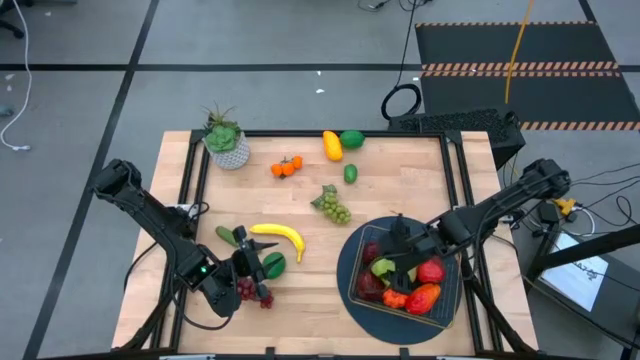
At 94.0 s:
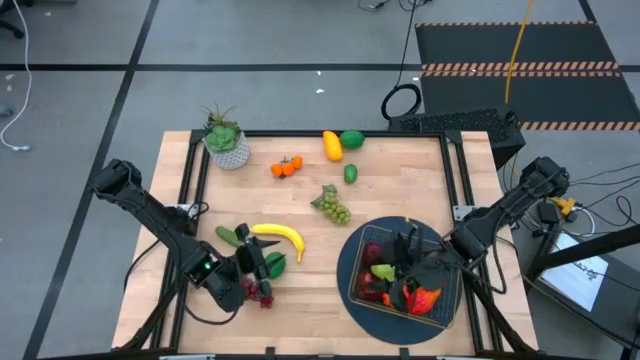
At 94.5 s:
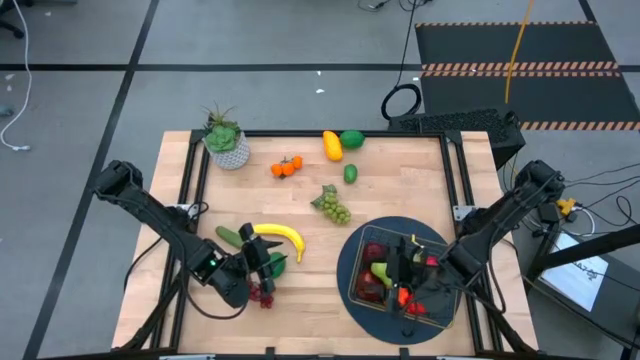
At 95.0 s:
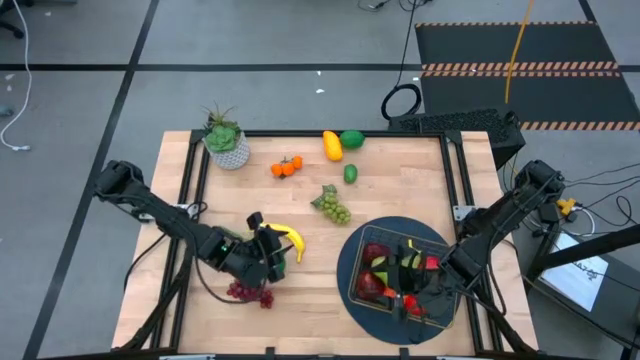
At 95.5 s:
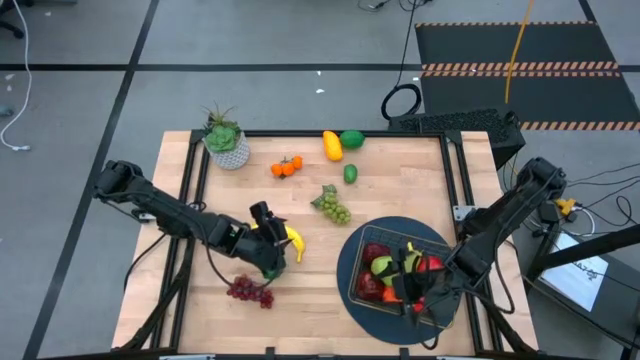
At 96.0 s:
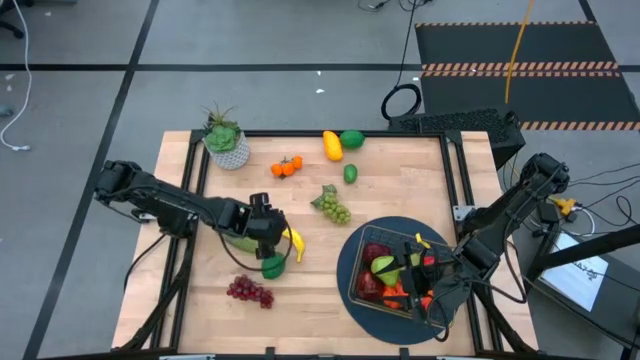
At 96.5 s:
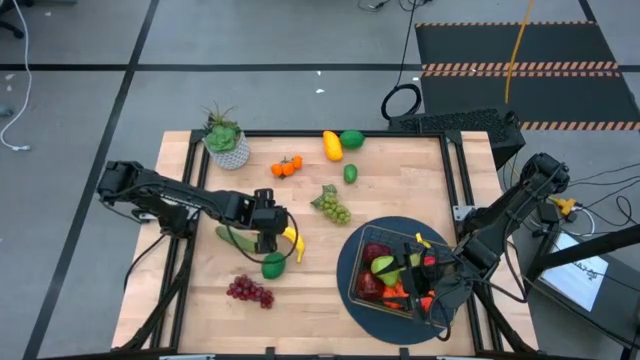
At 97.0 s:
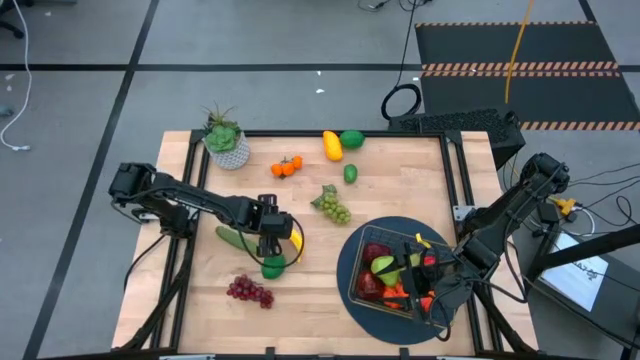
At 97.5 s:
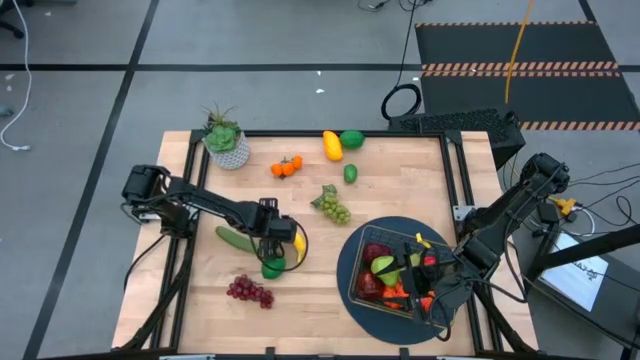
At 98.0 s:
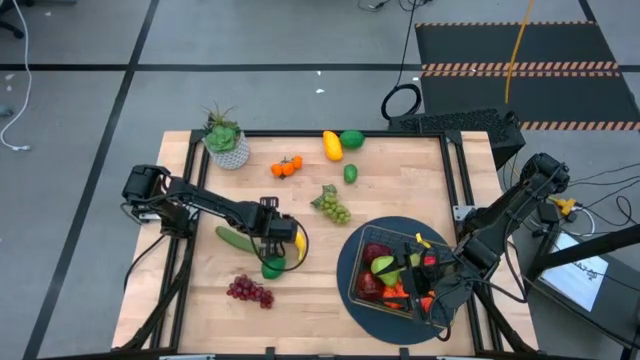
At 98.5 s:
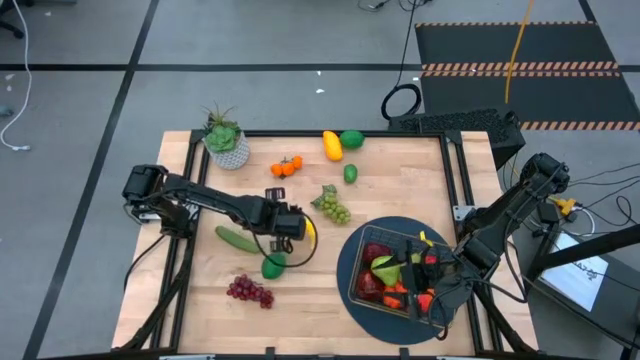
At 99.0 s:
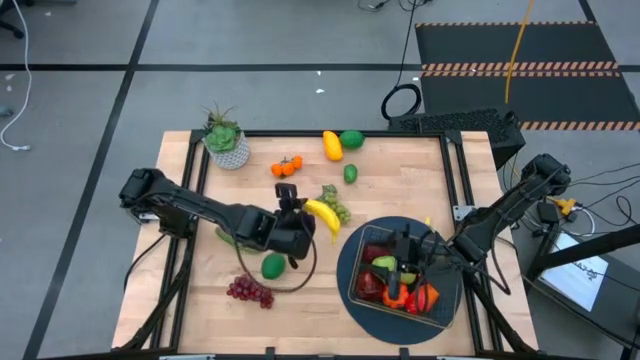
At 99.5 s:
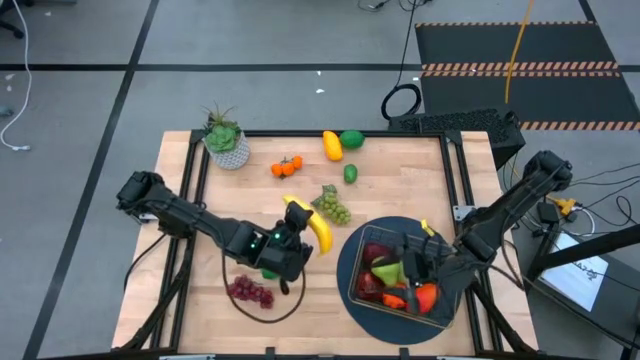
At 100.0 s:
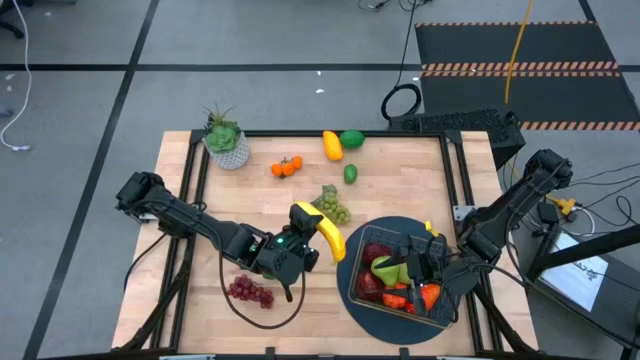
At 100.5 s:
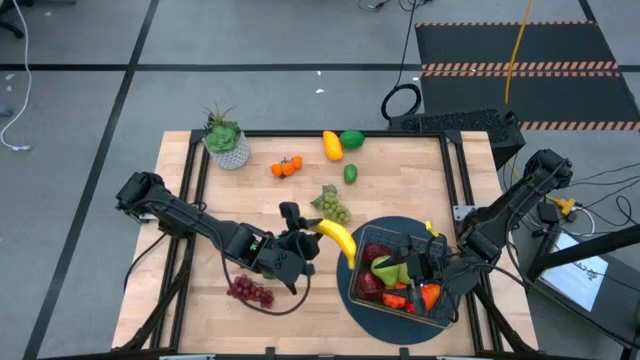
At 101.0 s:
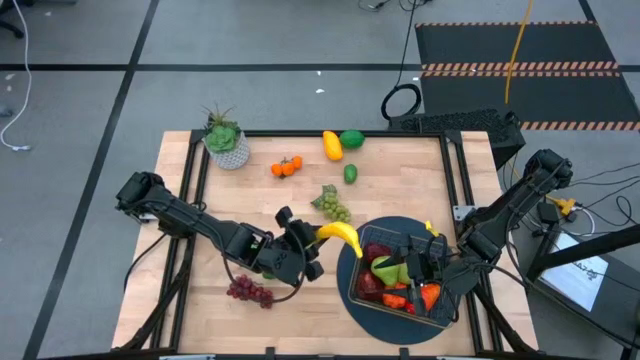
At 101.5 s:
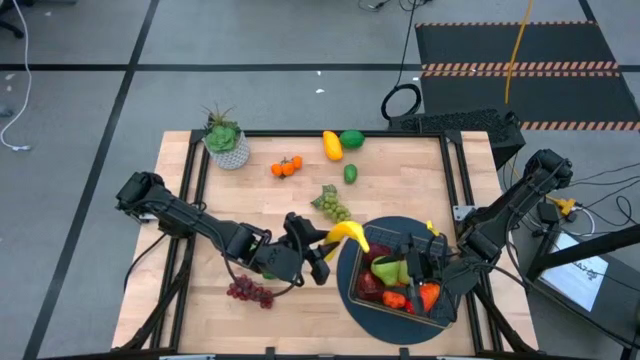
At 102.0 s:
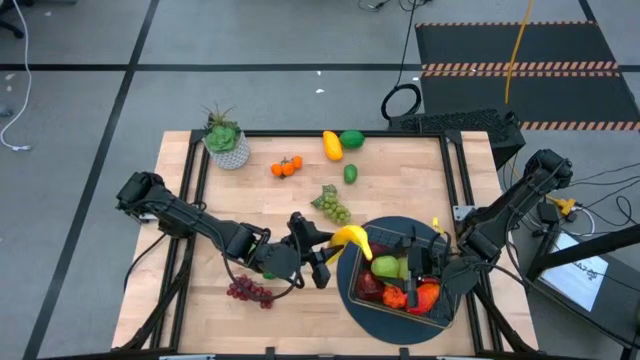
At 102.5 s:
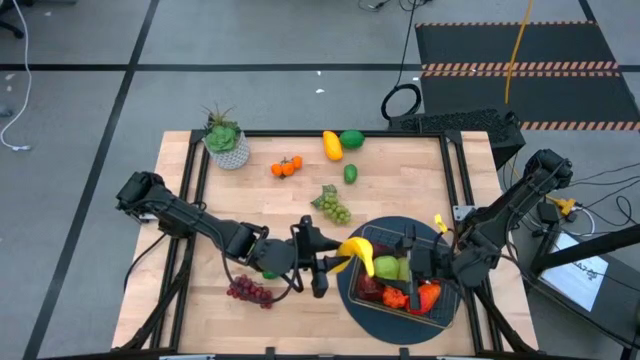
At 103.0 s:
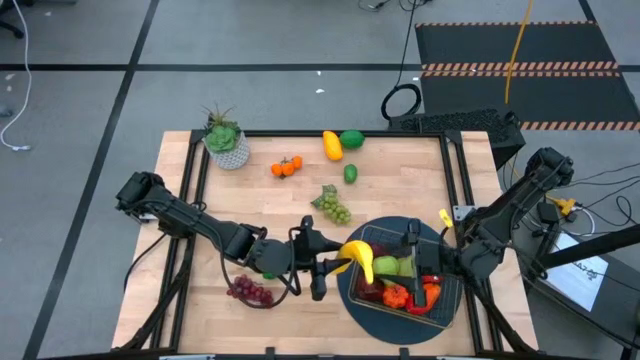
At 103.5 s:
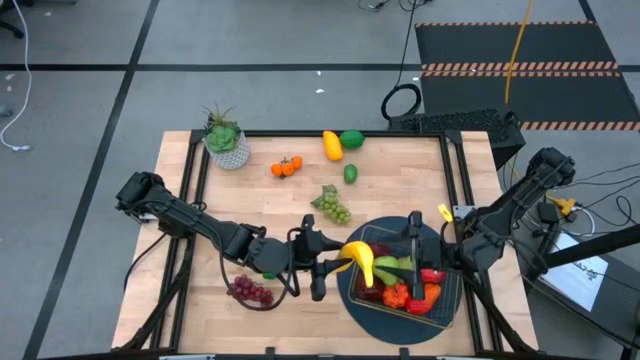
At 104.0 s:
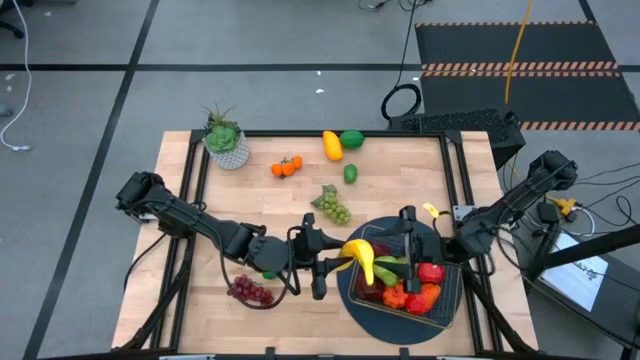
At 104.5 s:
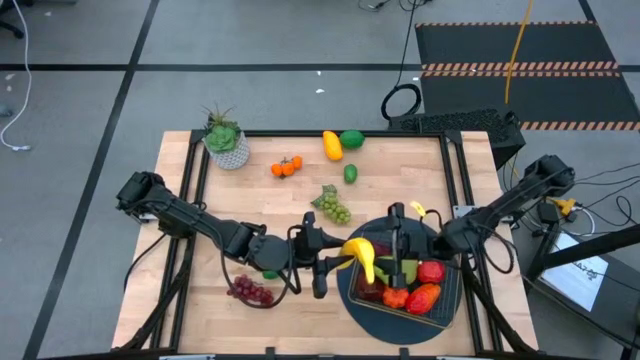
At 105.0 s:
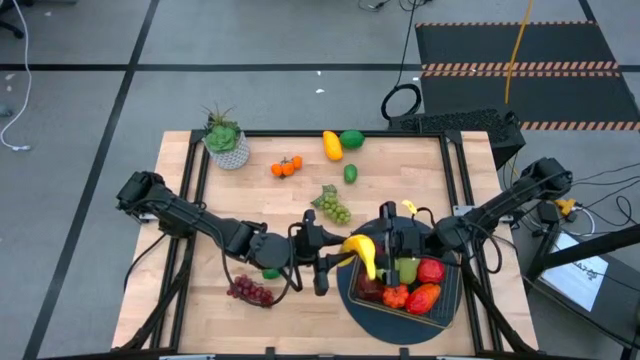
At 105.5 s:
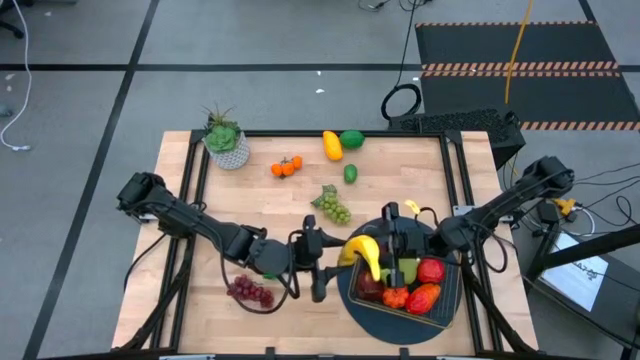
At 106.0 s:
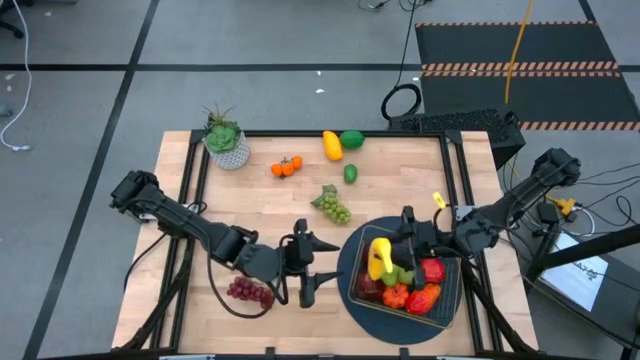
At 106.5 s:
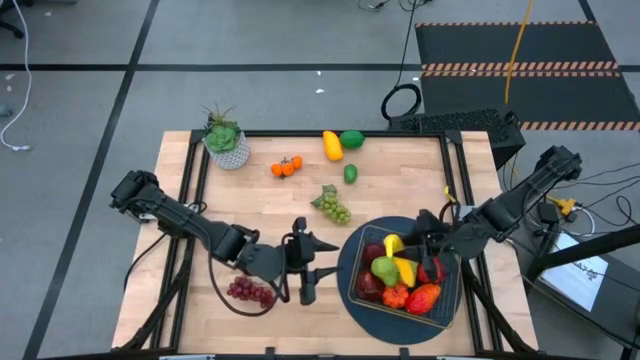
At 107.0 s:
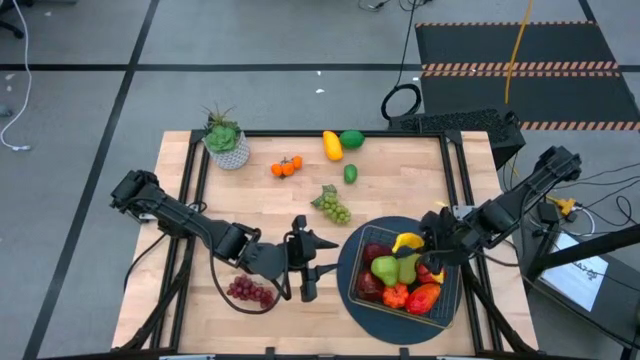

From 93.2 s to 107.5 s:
Task: Build produce basket
Put the banana into the gold wire basket

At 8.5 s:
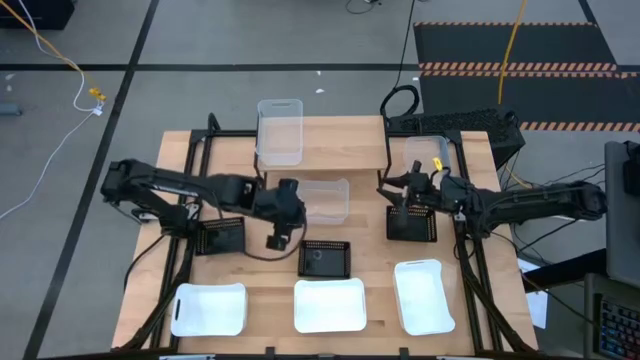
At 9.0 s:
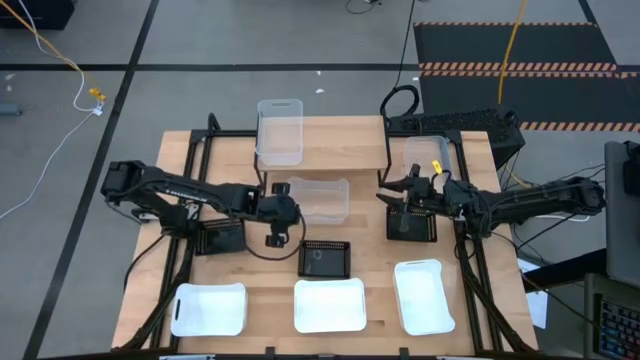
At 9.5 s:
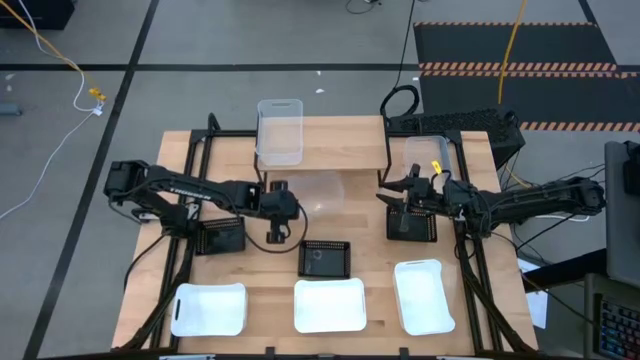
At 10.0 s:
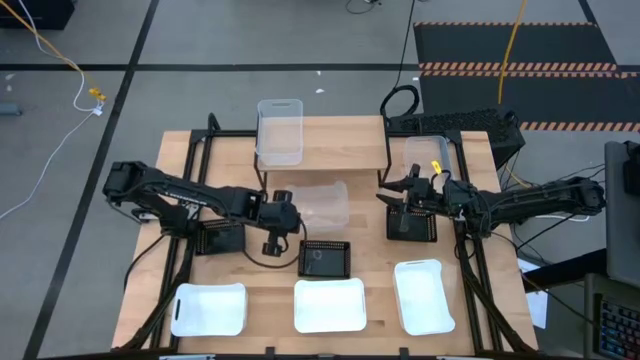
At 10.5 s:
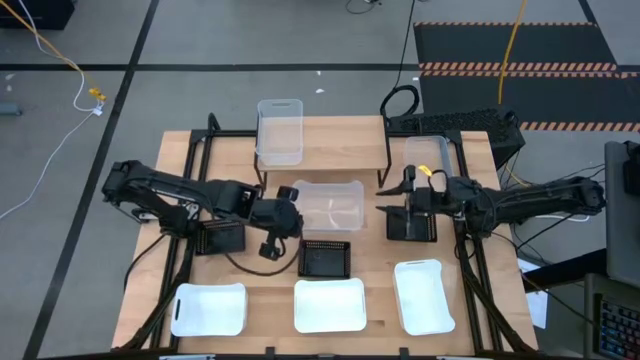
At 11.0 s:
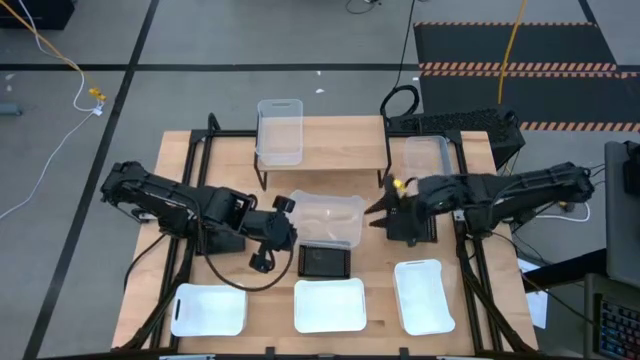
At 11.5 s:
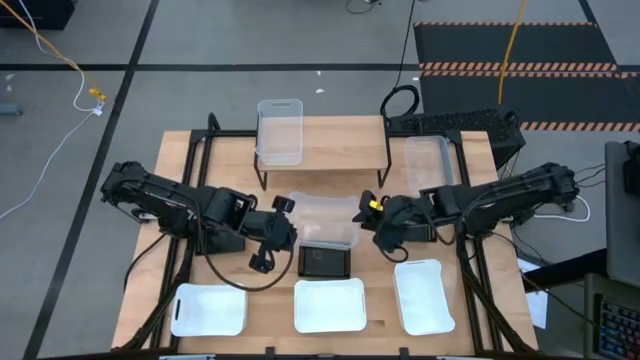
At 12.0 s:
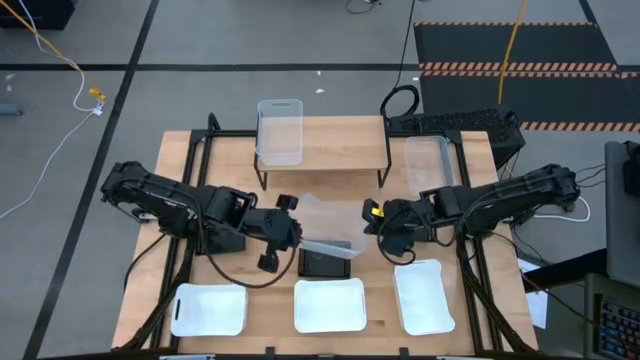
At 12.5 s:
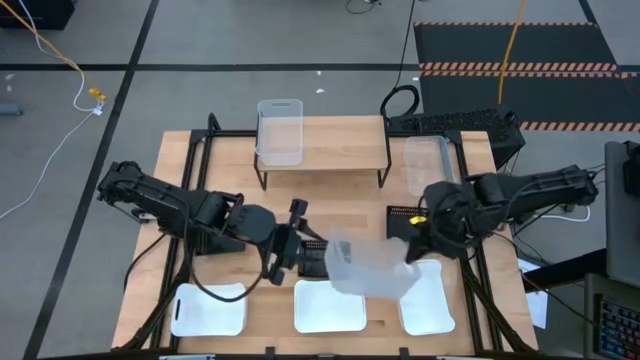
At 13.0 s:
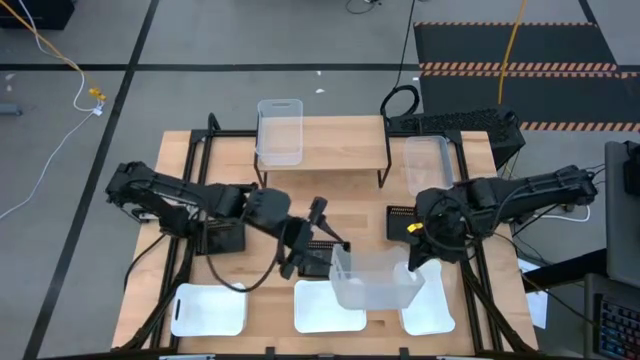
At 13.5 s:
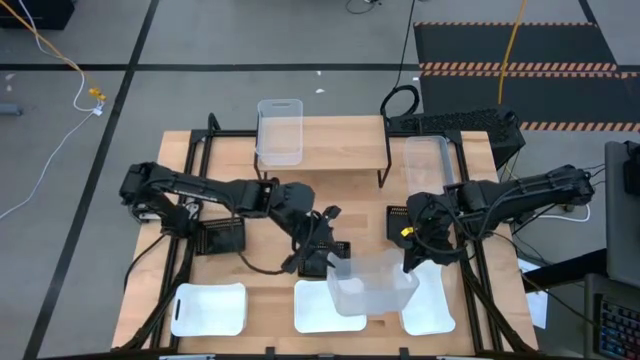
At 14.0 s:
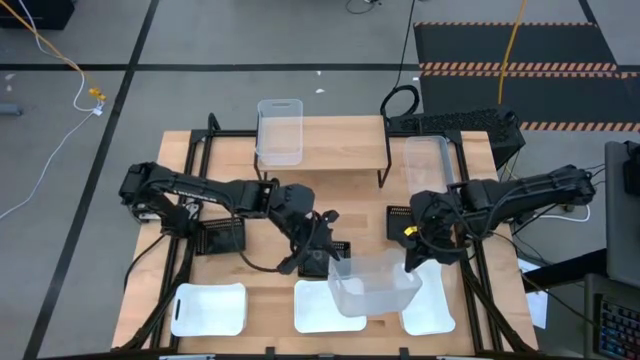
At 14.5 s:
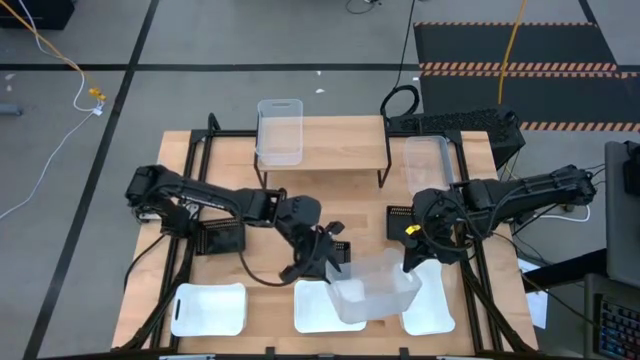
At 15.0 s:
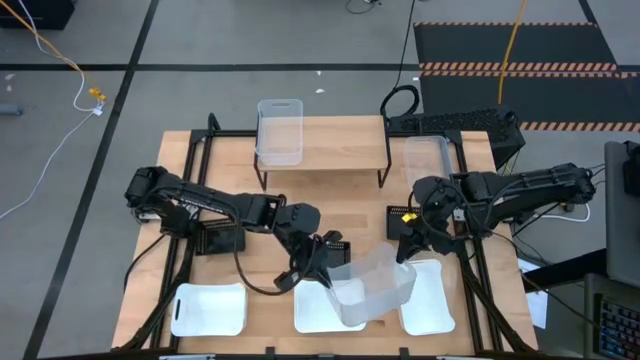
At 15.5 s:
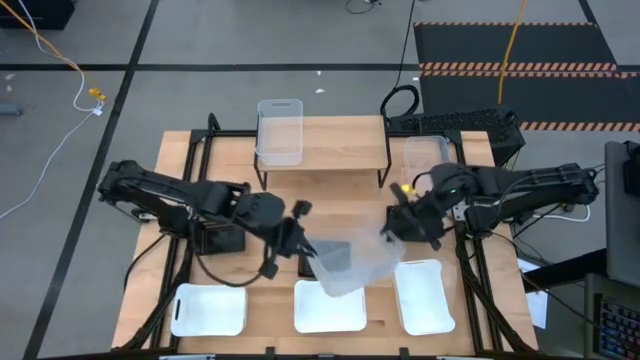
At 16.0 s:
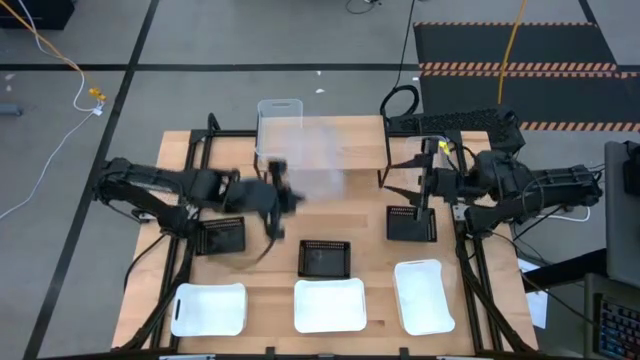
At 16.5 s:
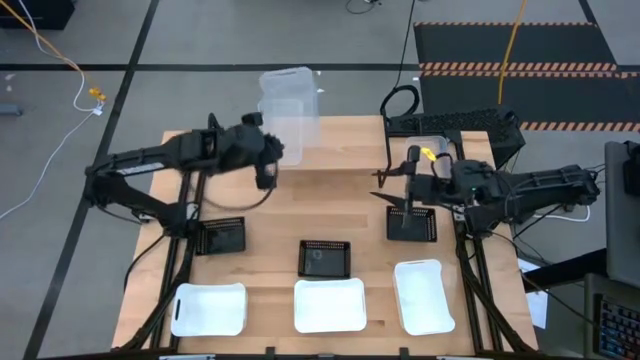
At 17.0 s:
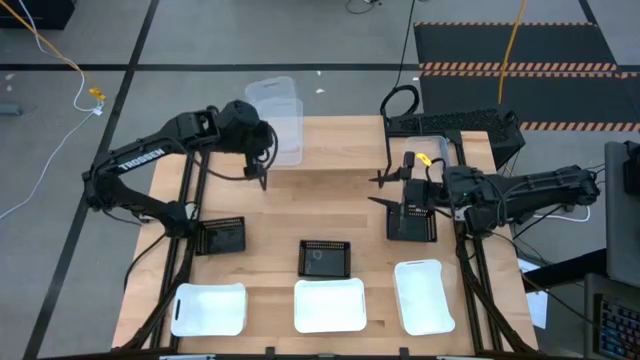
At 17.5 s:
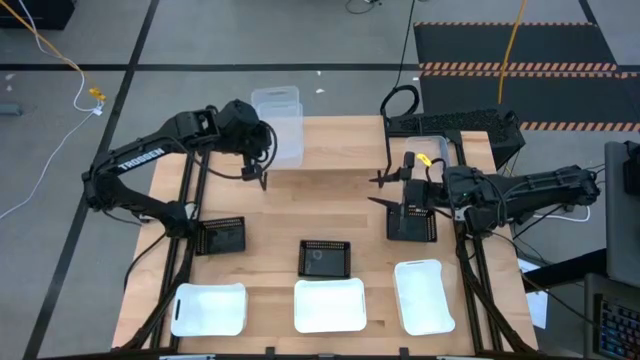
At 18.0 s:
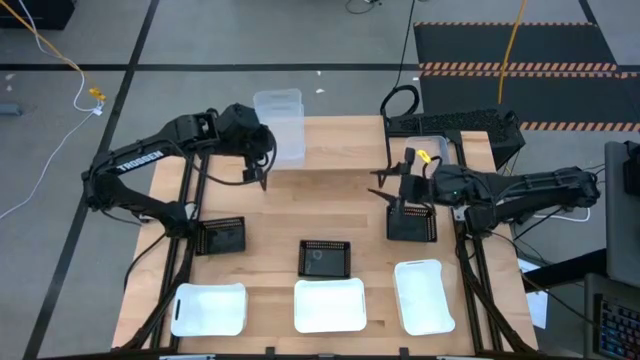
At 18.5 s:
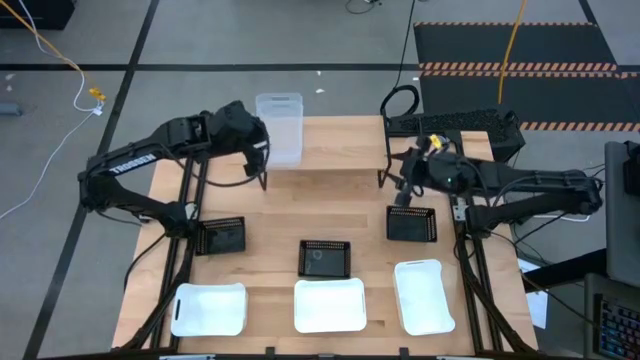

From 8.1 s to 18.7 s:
Task: Stack baskets on shelf by color
Stack the middle transparent bin on top of the transparent bin on the shelf
